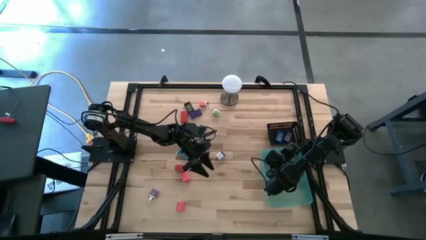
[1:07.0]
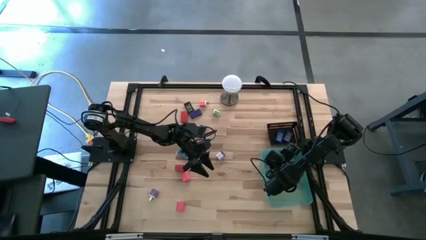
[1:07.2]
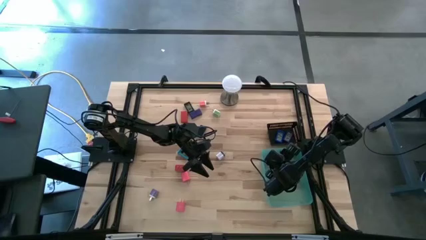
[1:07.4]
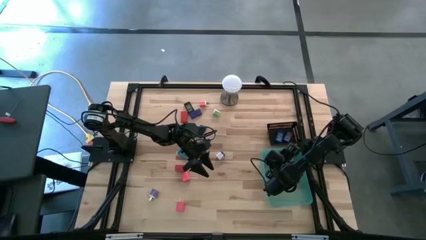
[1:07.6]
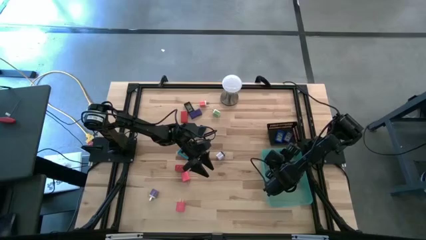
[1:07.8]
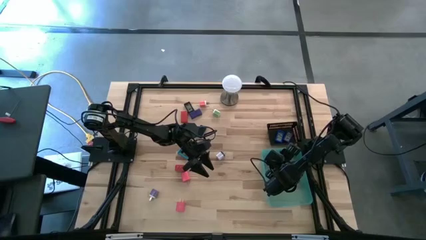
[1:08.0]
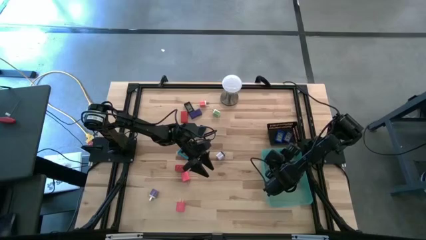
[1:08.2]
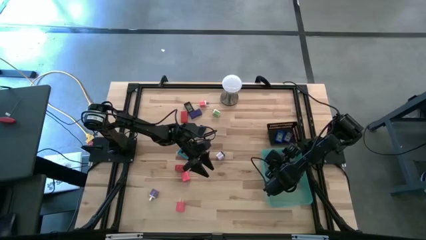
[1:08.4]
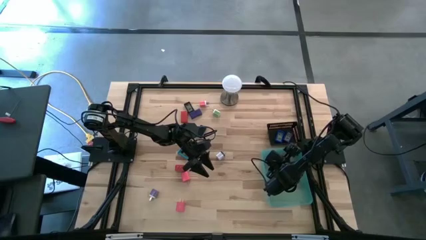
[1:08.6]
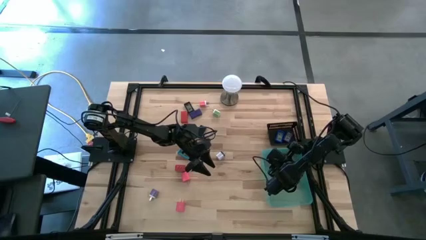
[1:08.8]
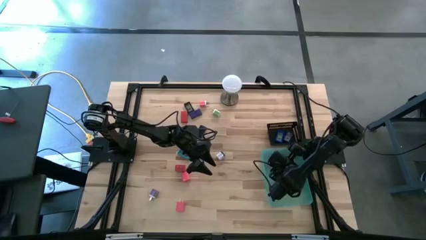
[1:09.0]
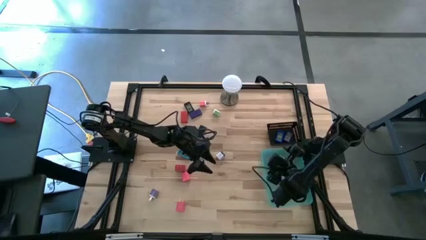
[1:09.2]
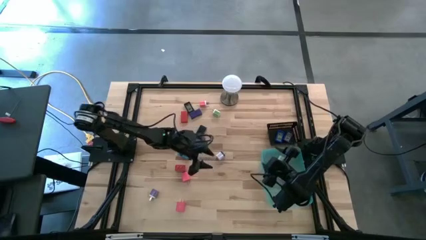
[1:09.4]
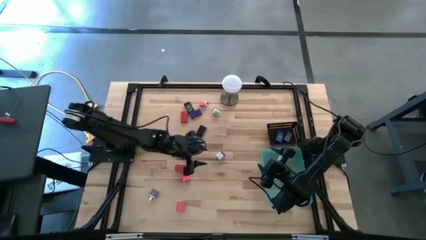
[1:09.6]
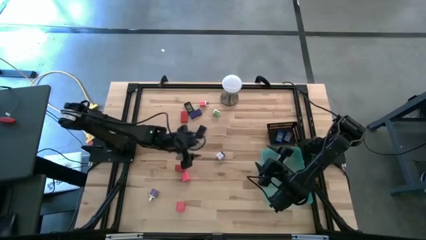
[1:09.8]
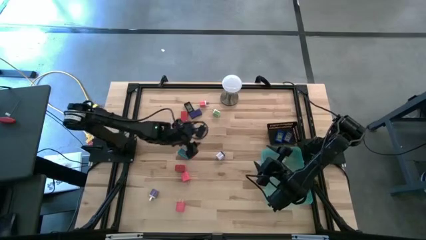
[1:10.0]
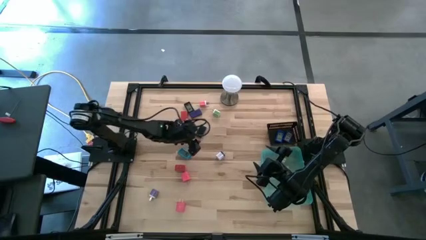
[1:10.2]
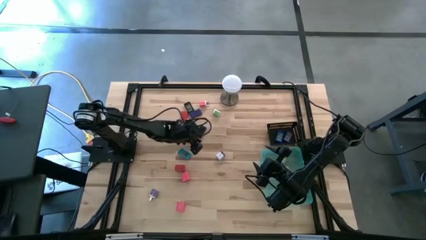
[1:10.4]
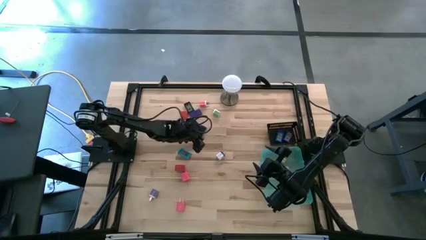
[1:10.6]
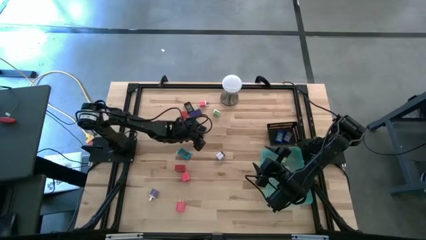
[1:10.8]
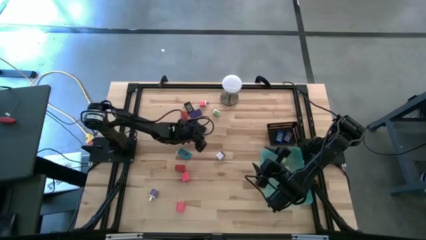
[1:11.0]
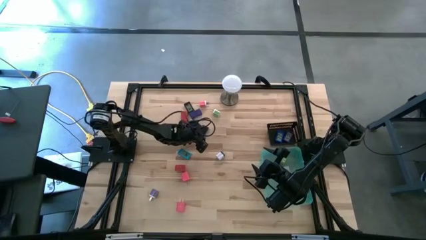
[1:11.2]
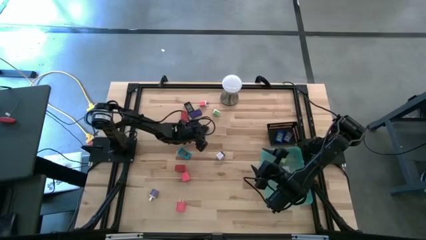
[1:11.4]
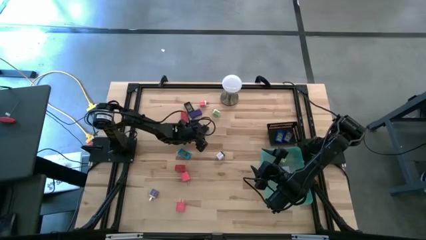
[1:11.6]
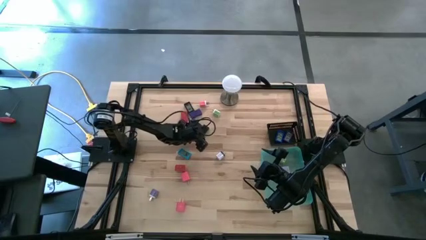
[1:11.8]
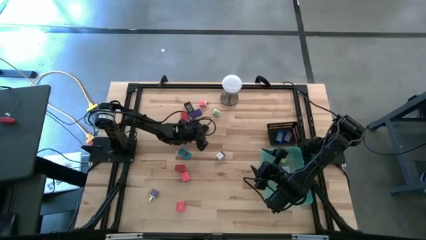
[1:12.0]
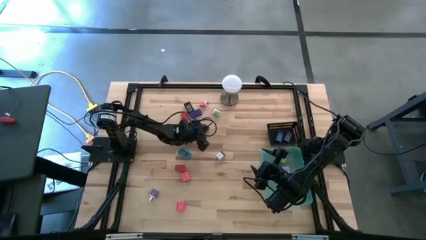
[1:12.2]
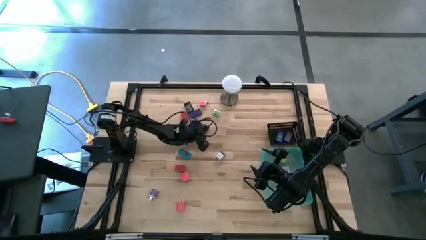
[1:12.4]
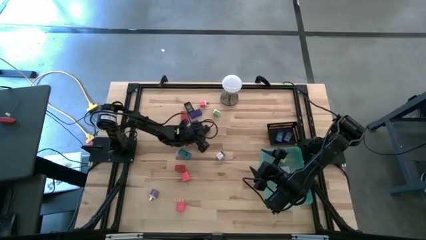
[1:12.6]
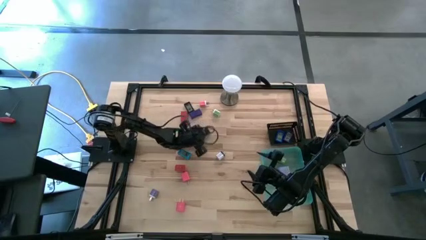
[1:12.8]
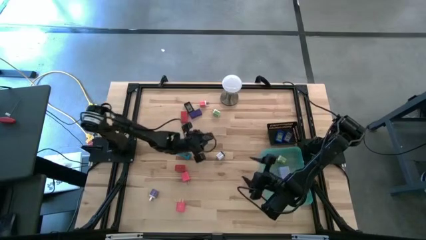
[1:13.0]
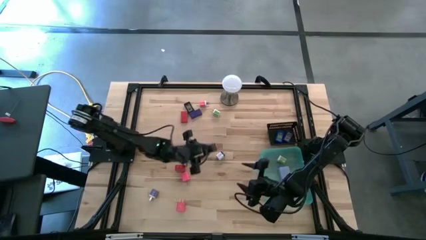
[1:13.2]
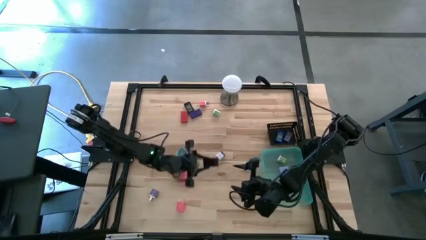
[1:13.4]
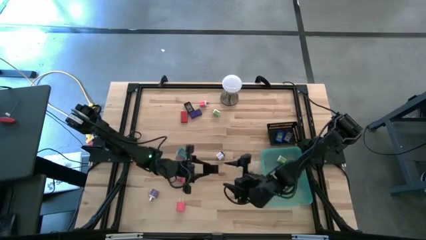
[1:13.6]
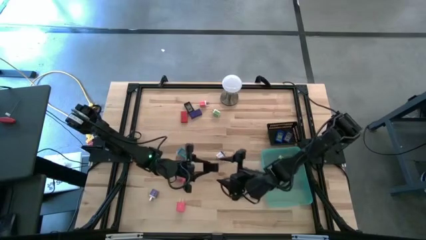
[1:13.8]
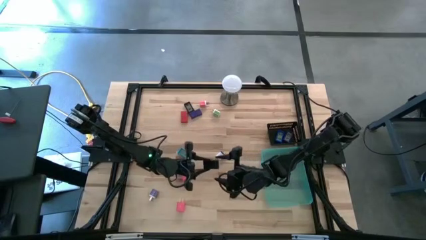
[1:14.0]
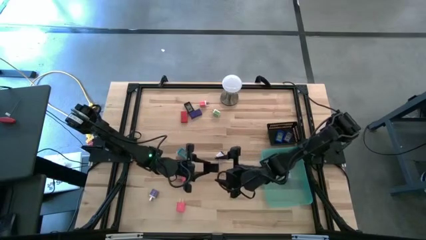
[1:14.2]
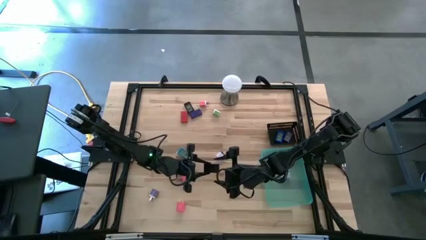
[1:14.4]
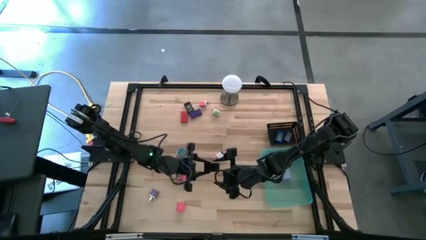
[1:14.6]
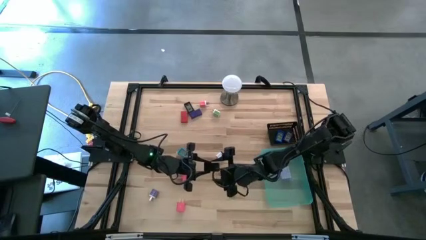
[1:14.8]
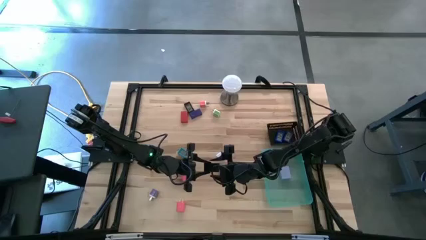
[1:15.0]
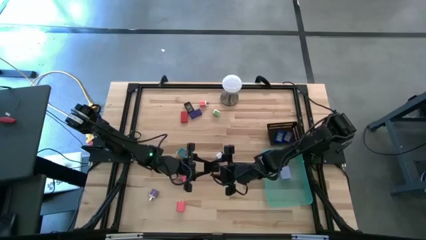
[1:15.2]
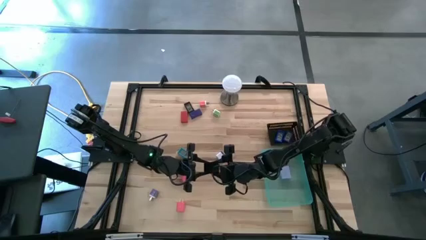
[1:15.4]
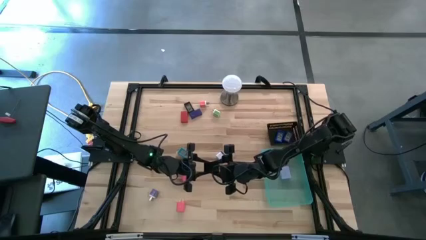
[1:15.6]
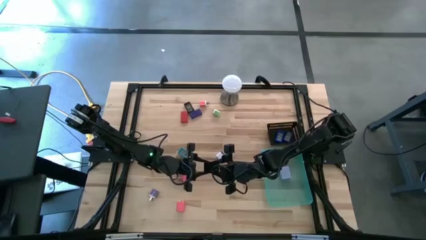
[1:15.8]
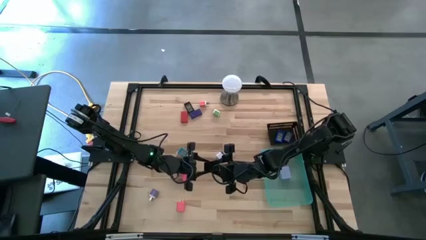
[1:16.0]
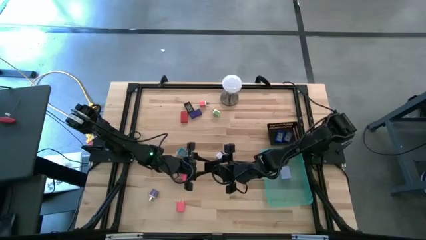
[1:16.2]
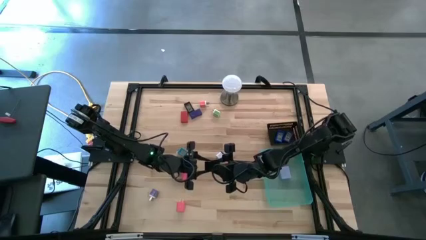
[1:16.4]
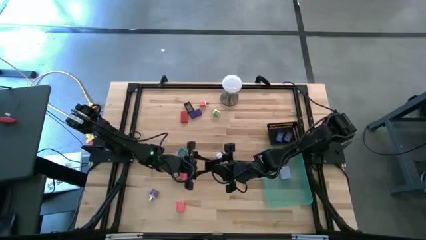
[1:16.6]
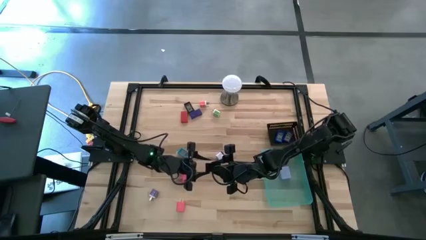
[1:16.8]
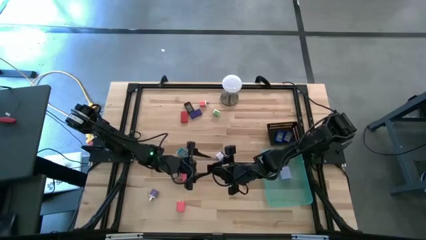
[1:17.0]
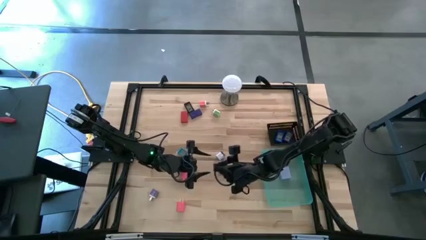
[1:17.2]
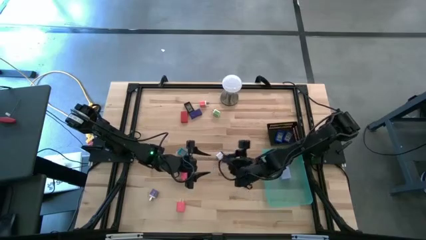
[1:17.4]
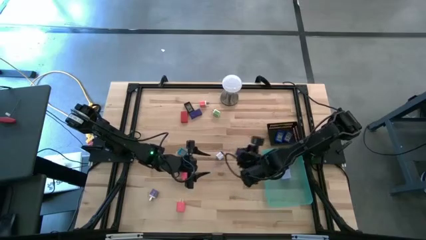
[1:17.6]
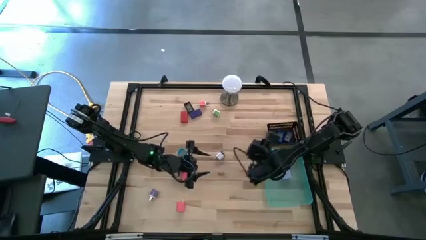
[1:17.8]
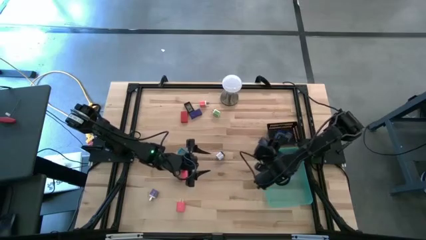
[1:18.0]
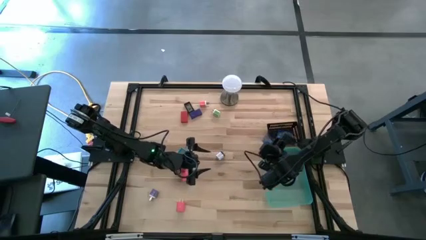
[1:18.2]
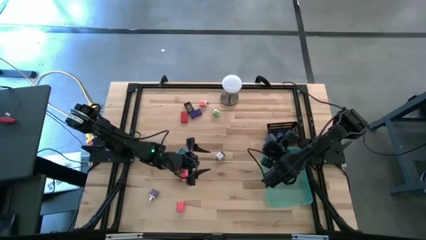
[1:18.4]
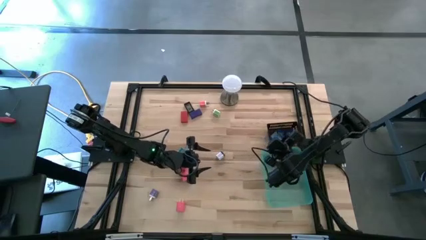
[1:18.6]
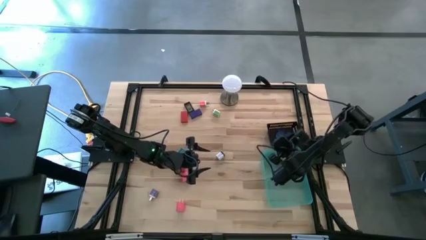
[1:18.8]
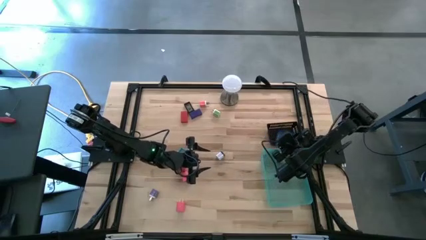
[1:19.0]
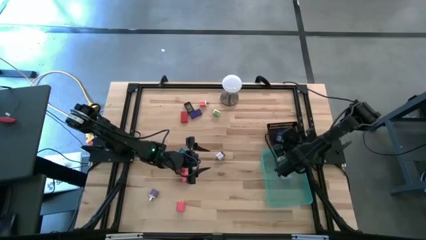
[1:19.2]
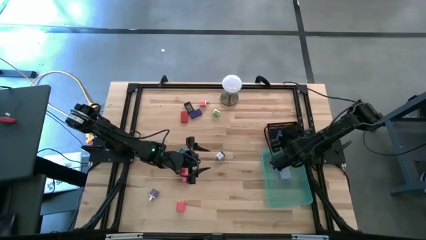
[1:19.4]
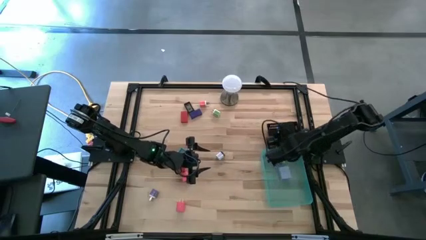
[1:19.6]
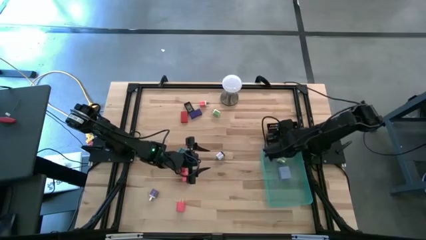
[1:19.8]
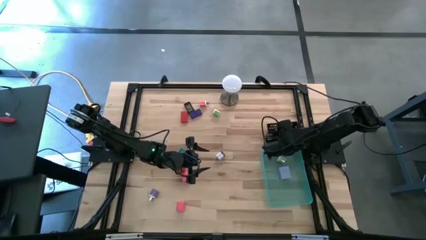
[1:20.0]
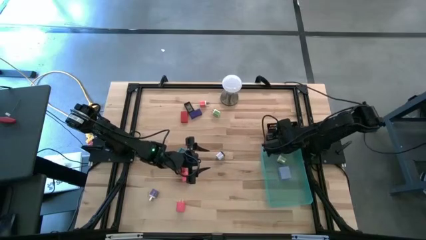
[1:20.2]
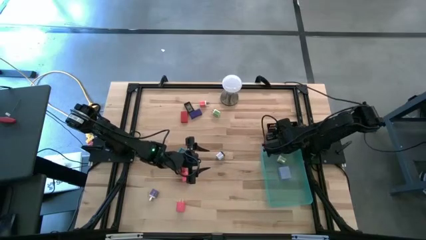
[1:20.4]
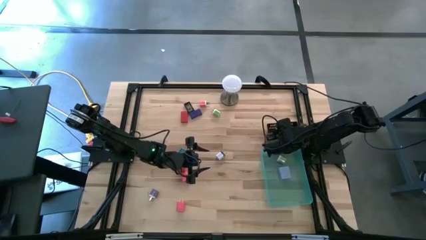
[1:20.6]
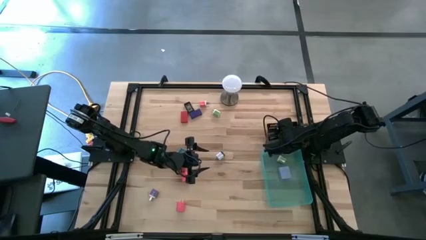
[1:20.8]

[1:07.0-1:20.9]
Task: Pick & Place Office items
Put the black charger adapter into the green bin

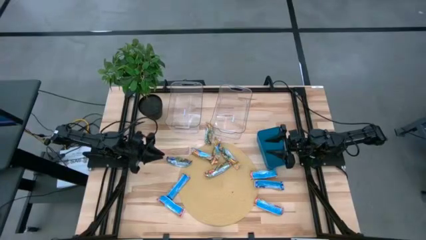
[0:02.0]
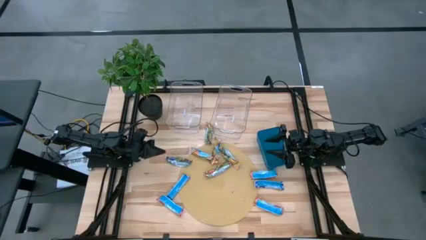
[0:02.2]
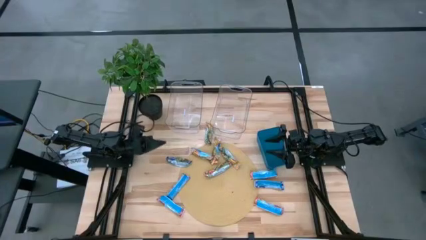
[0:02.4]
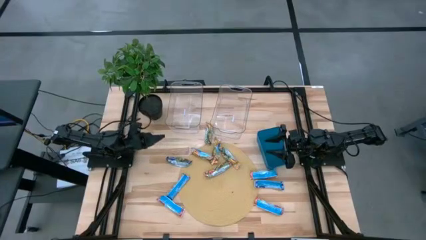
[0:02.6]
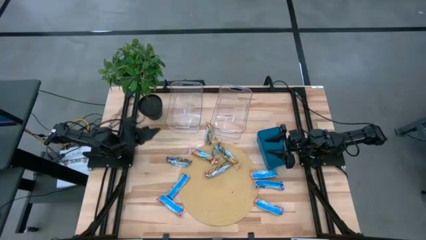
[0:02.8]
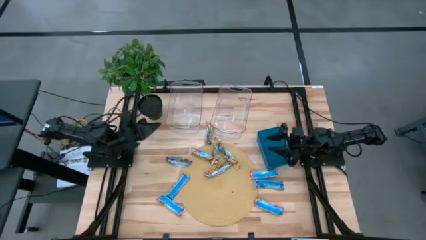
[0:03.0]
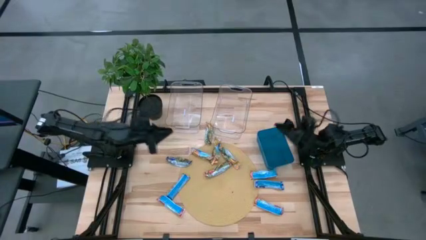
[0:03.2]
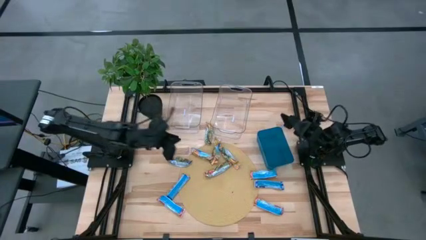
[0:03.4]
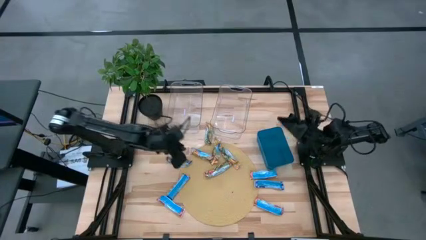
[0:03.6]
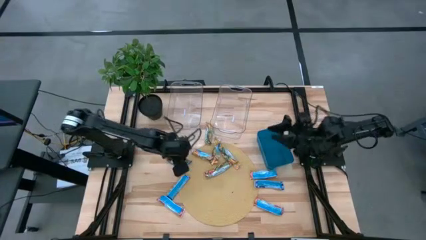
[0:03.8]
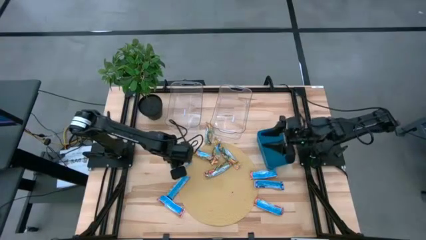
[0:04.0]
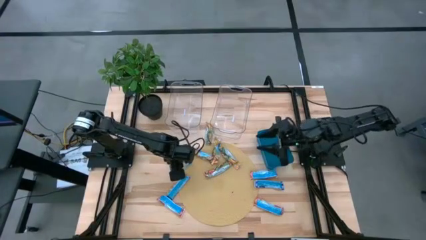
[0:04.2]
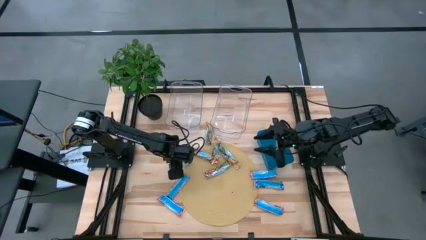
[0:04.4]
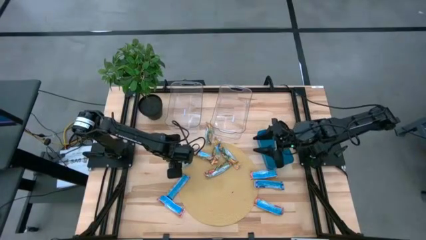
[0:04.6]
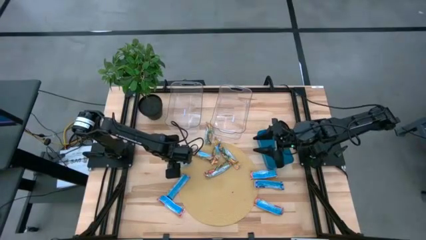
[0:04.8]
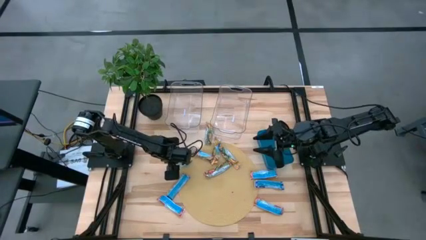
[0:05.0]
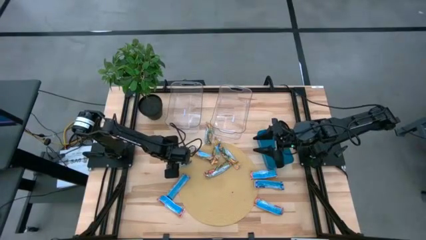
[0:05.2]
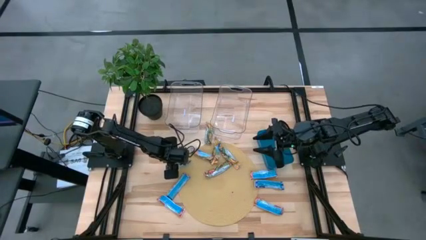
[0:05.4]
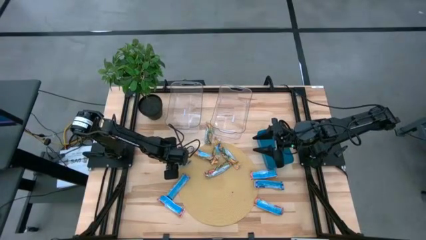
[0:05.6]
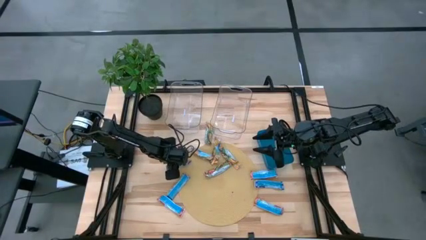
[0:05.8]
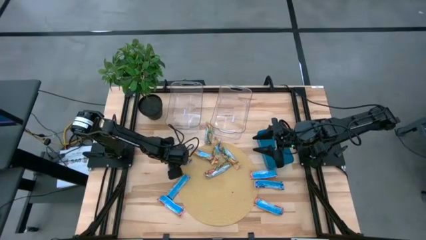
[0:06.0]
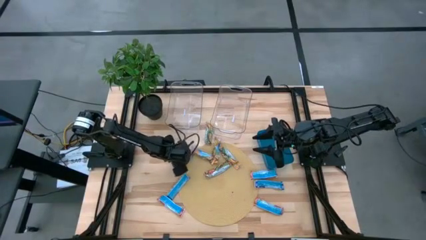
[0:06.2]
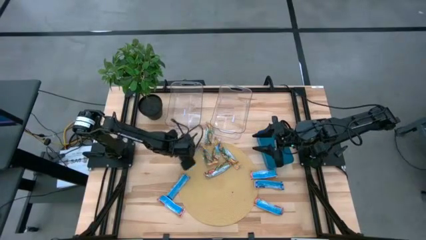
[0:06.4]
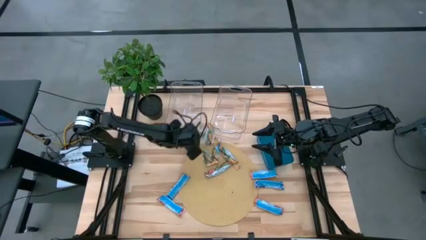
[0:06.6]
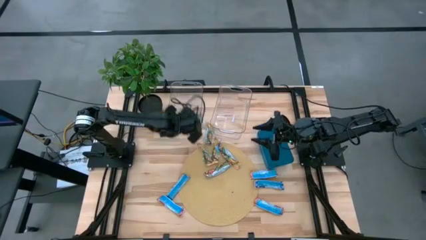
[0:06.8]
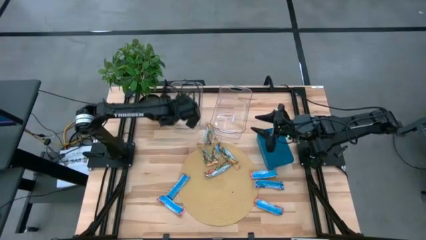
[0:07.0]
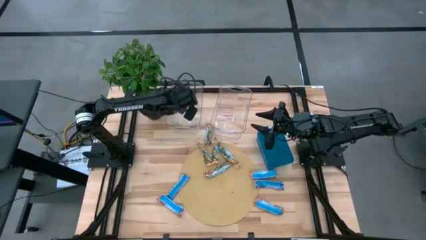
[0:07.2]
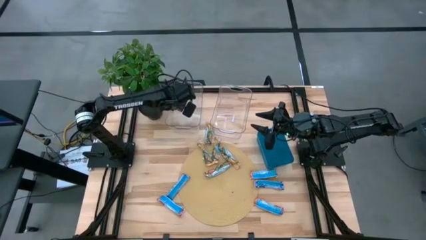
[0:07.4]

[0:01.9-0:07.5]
Task: Pick and place Granola Bars by type
Put the top blue granola bar into the left transparent bin
